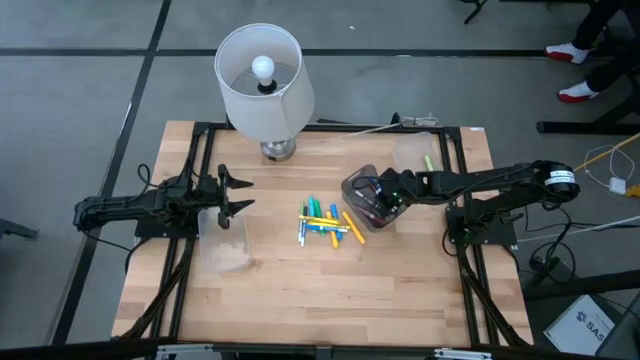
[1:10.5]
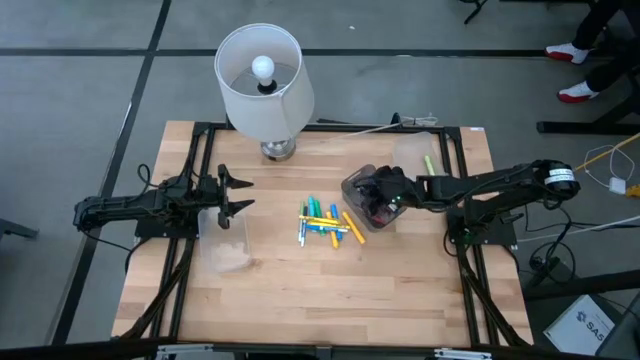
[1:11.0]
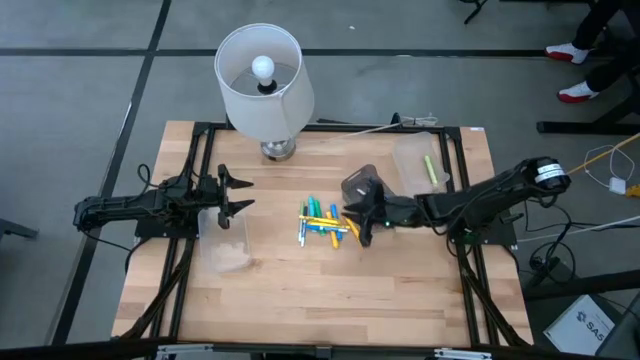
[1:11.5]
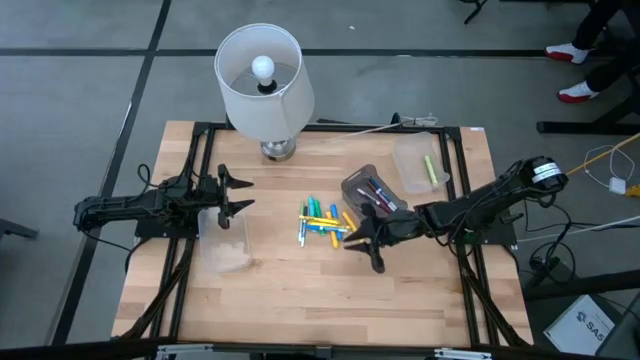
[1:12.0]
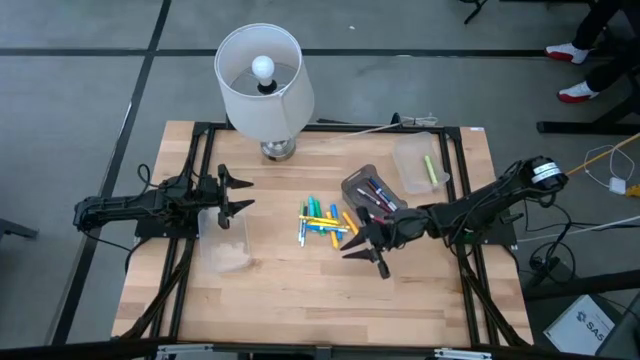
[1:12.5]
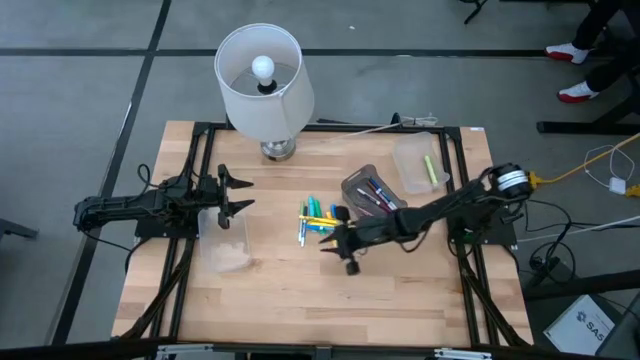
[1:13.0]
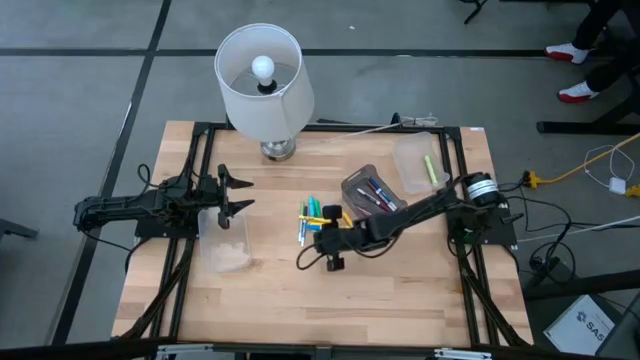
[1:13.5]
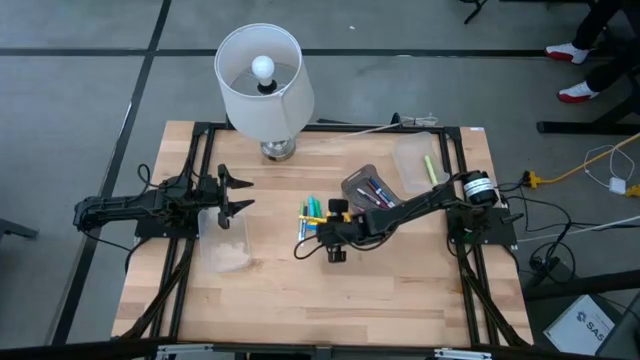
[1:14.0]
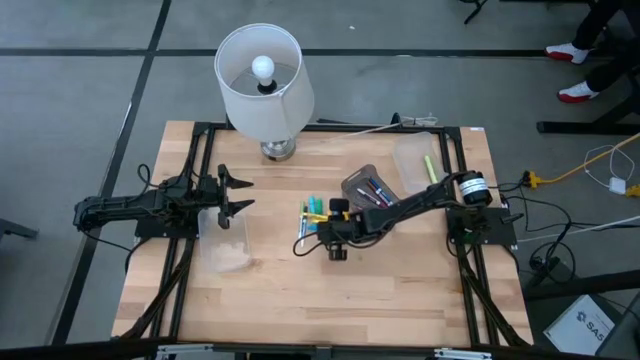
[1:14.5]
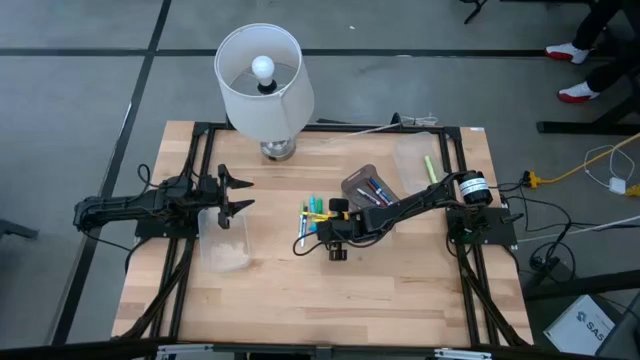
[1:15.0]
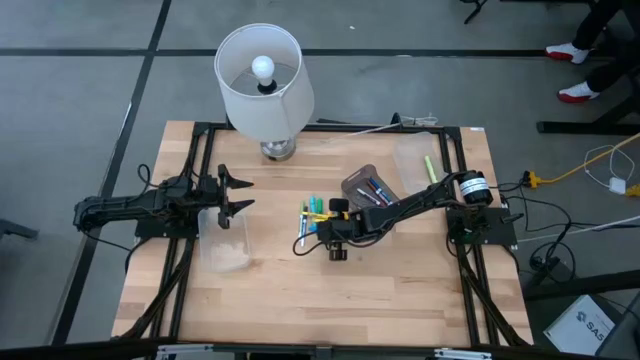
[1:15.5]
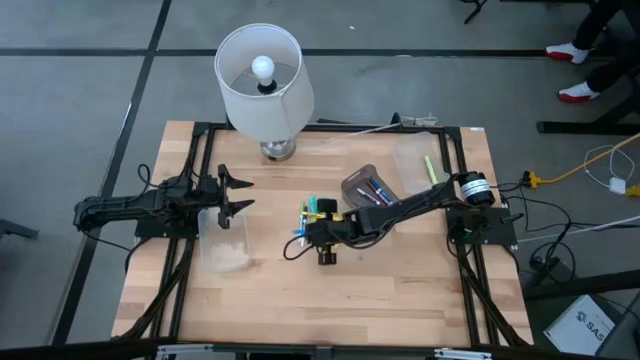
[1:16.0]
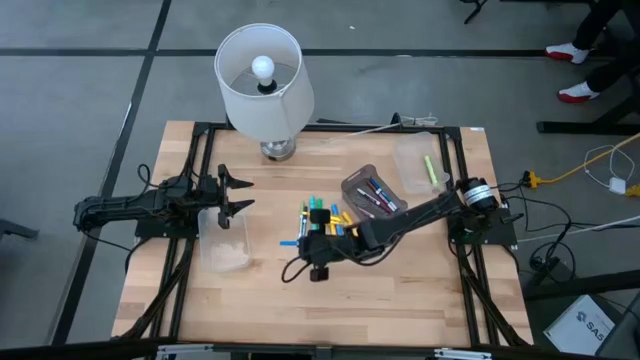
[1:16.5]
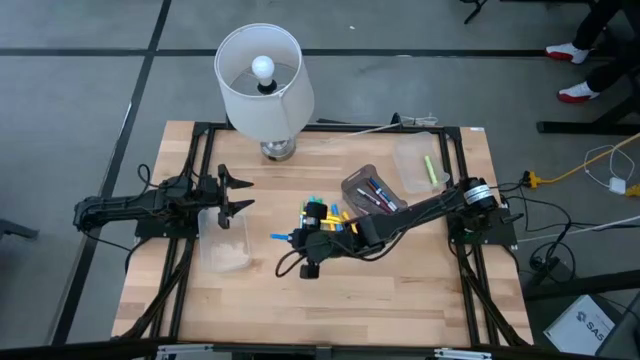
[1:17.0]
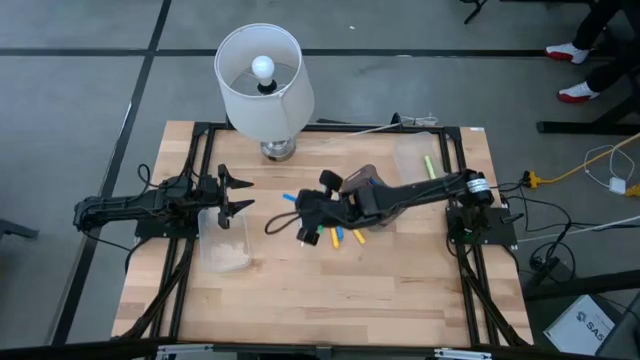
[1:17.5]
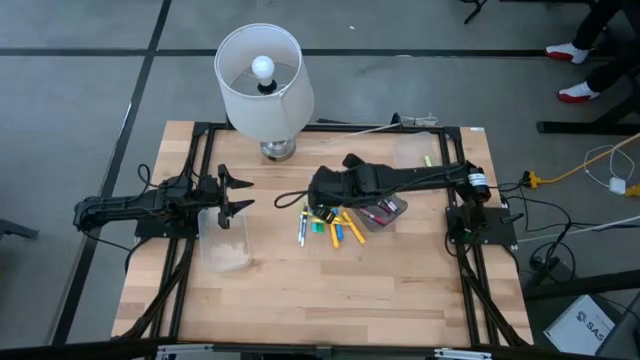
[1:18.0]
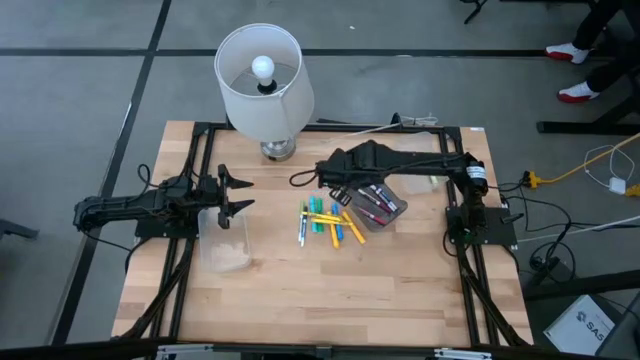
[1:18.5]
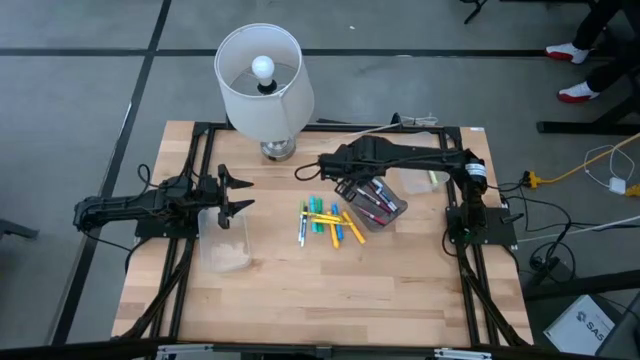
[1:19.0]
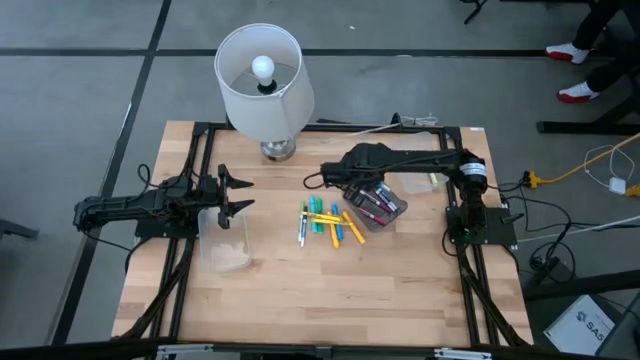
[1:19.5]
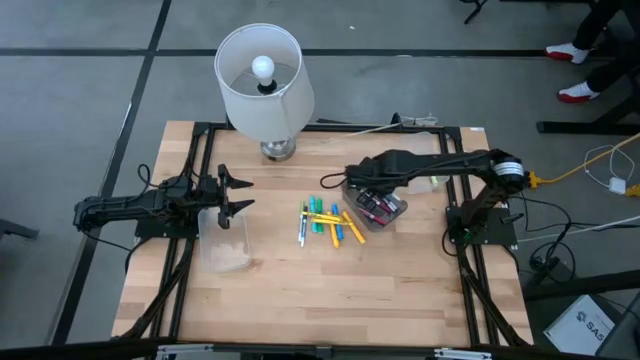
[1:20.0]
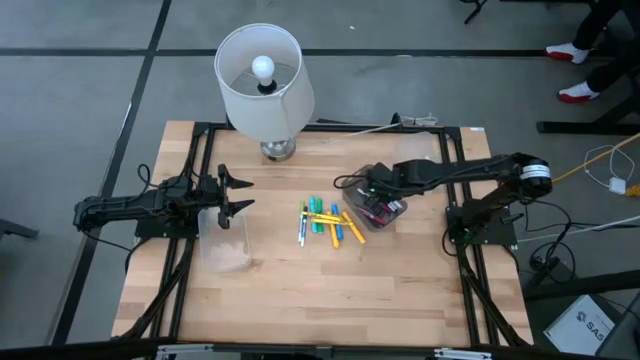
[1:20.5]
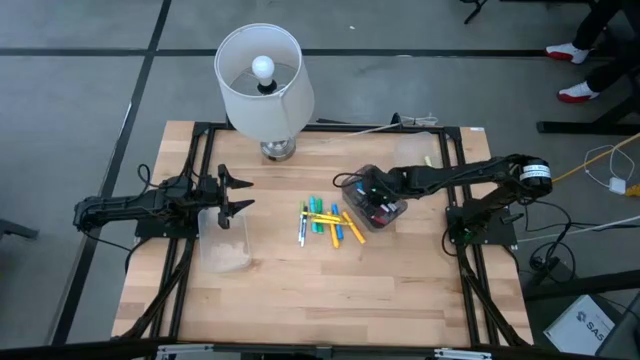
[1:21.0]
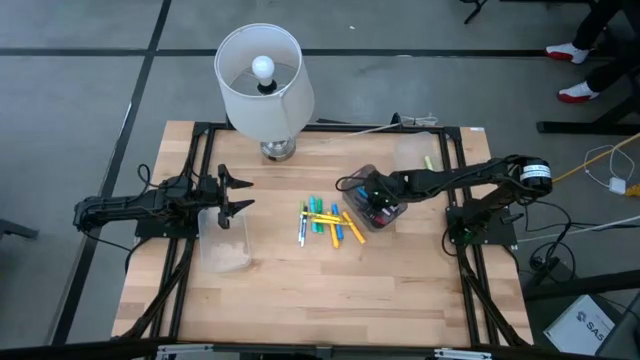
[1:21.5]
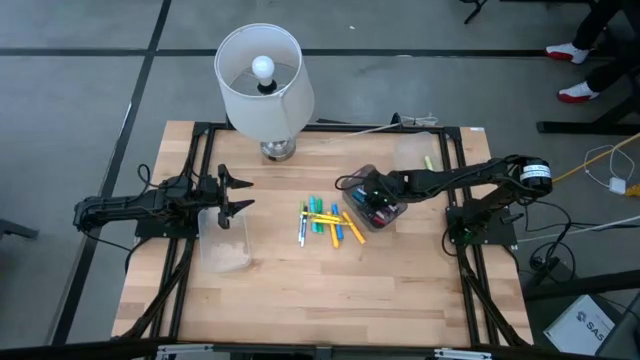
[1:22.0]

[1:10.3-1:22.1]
Task: Pick & Place Markers
Put the light blue marker pen into the black bin

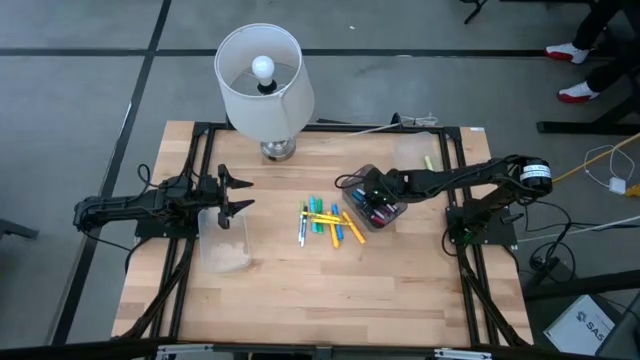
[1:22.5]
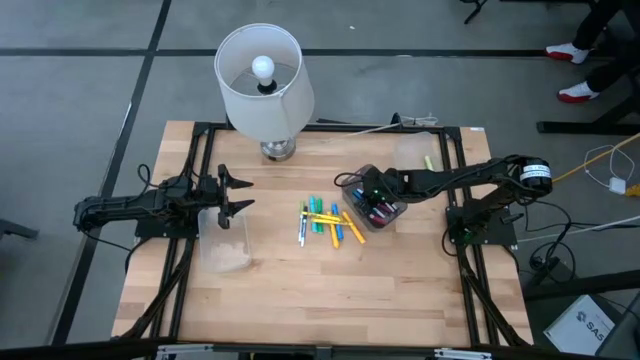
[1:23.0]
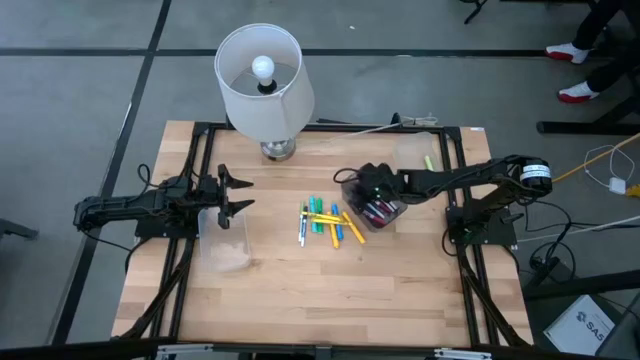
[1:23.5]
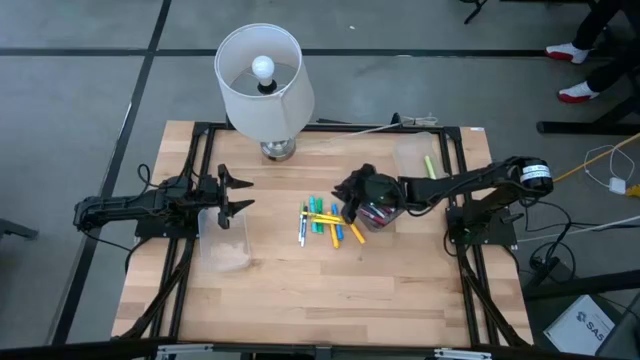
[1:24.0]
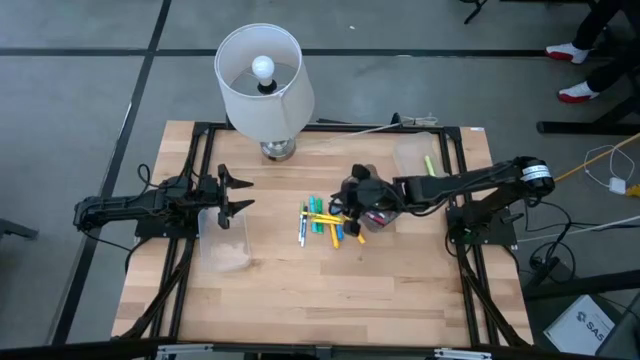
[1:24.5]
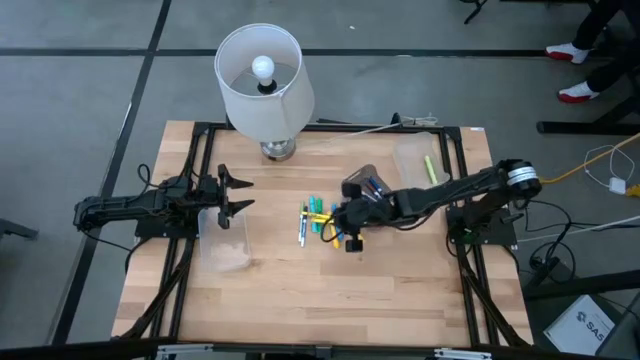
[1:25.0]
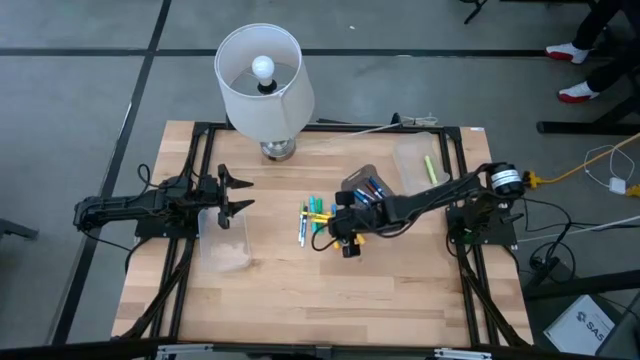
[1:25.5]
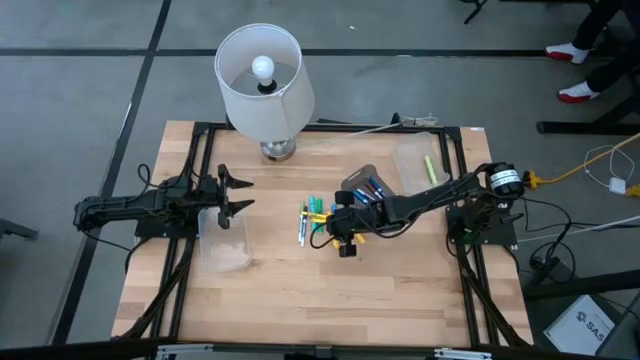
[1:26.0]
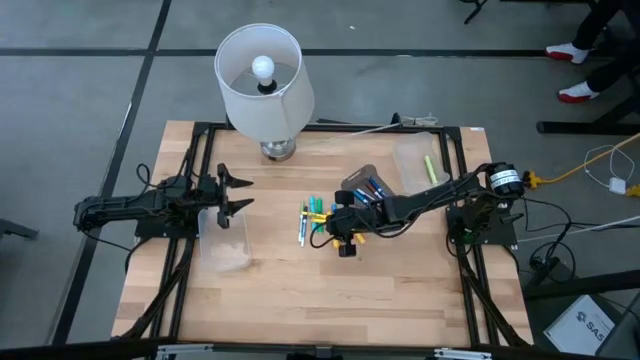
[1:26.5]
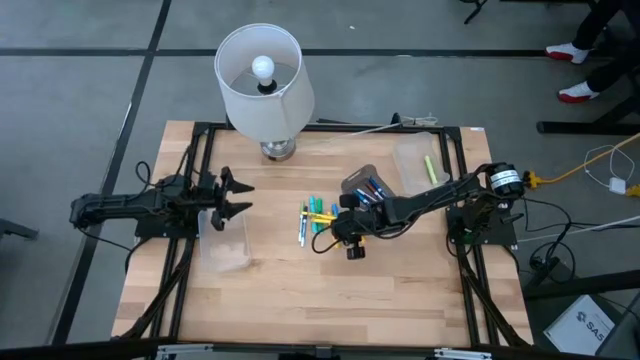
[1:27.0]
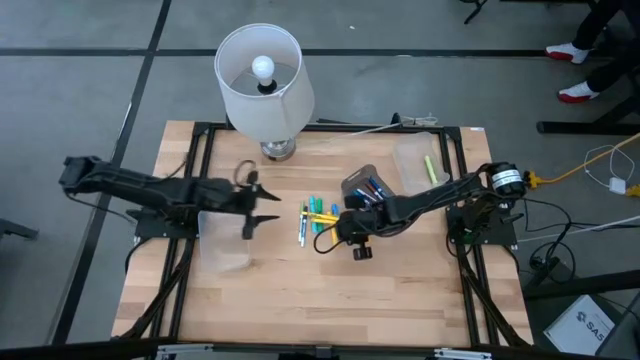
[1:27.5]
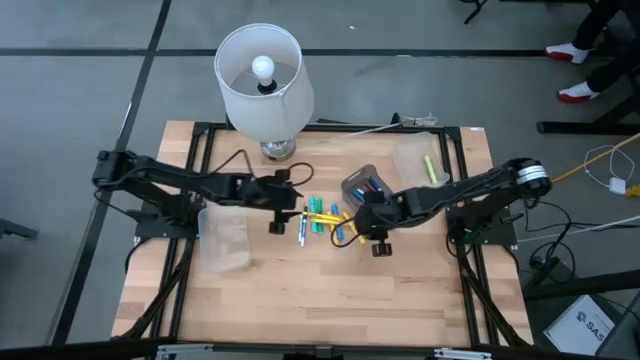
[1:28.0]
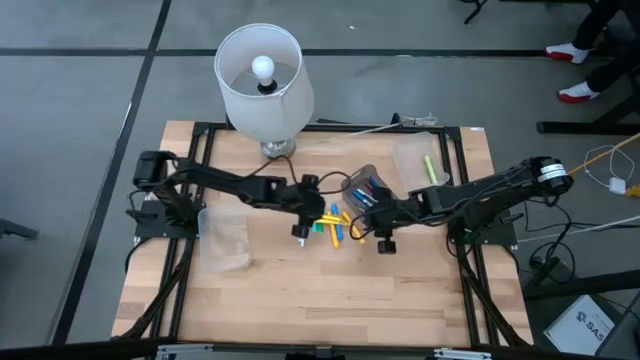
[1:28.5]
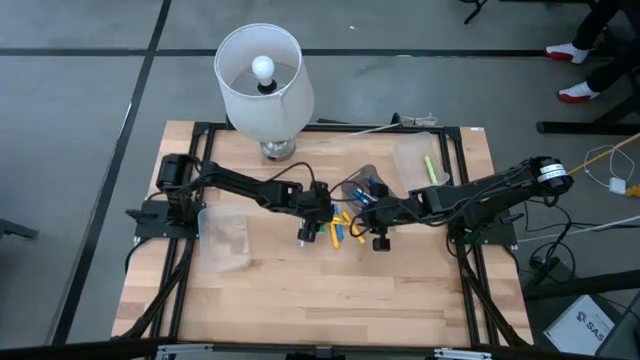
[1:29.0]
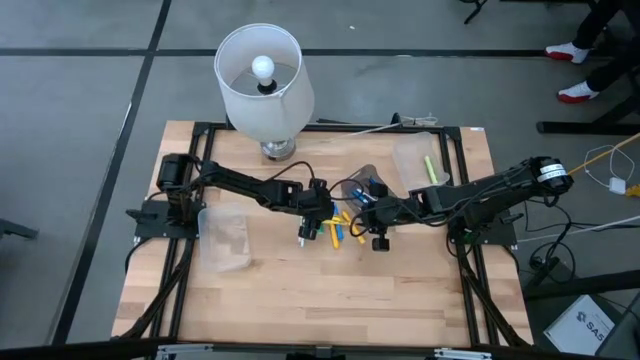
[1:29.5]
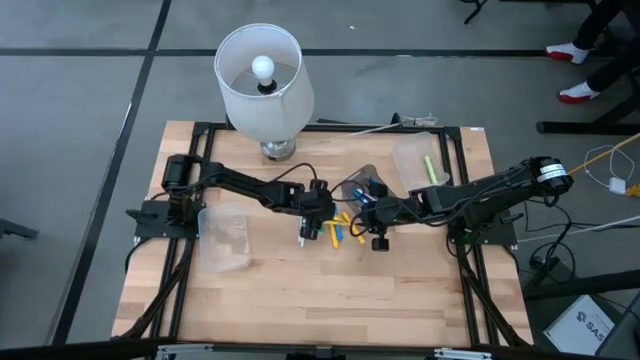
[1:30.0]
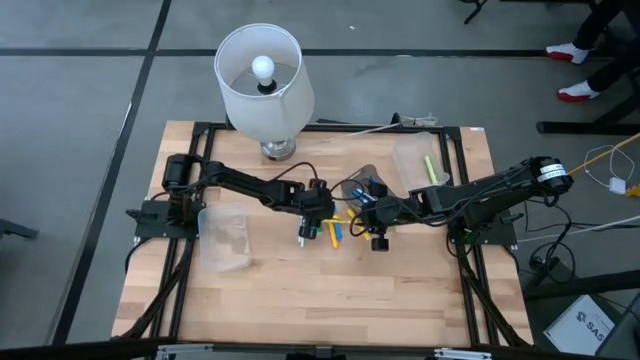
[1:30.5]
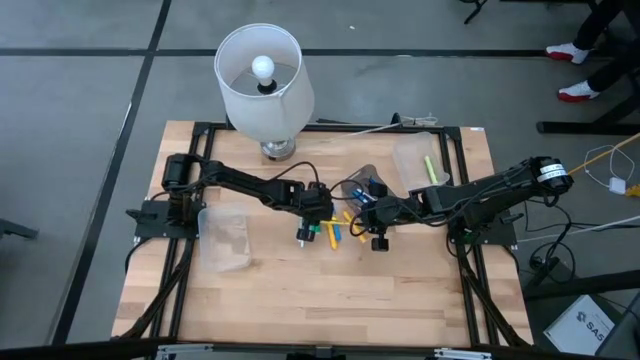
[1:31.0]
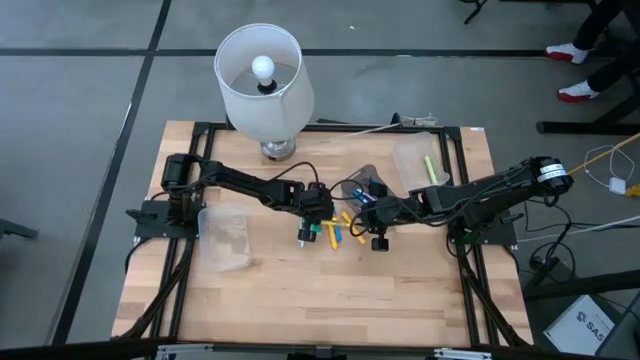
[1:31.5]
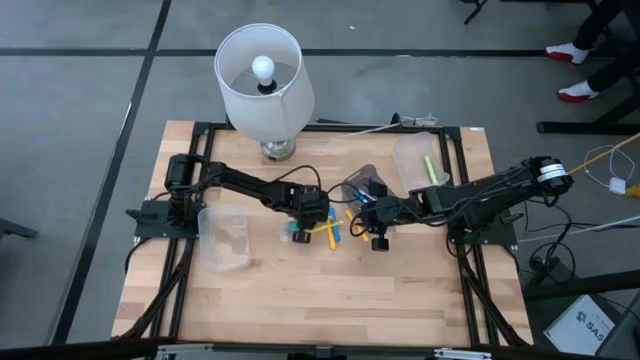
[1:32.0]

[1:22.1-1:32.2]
Put the yellow pen into the left transparent bin
